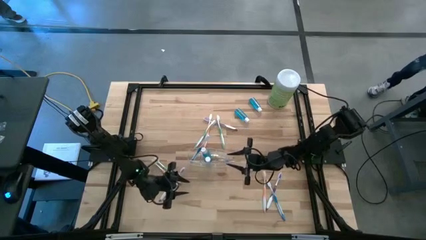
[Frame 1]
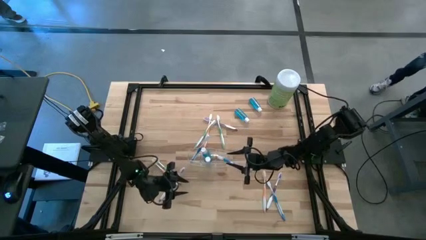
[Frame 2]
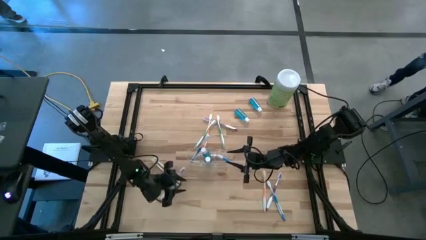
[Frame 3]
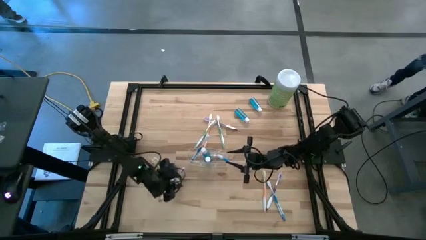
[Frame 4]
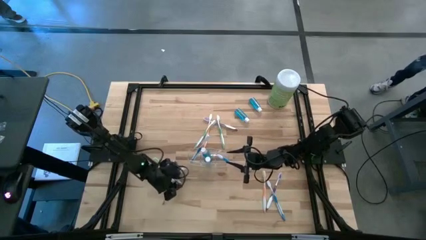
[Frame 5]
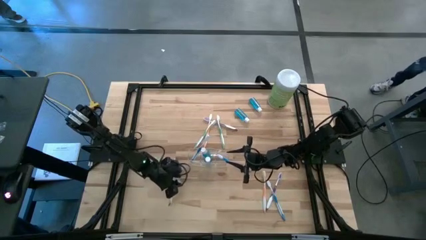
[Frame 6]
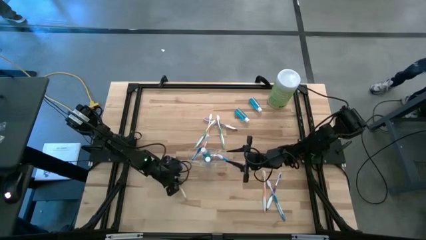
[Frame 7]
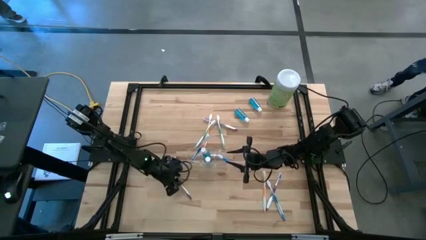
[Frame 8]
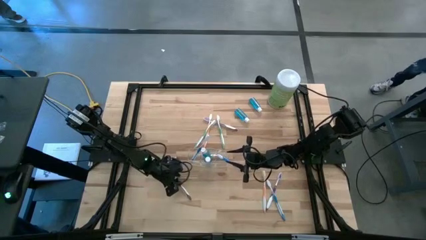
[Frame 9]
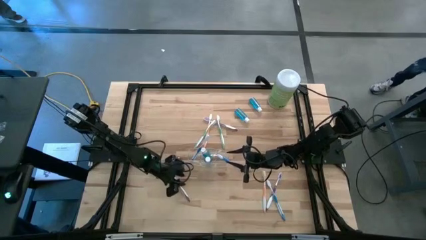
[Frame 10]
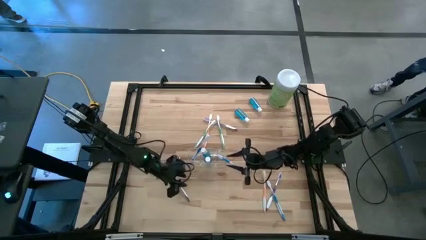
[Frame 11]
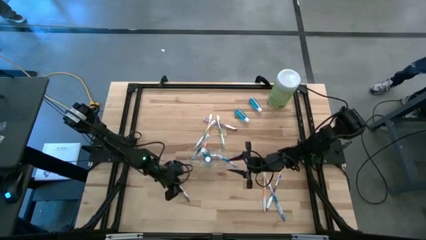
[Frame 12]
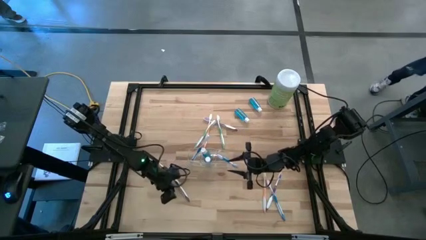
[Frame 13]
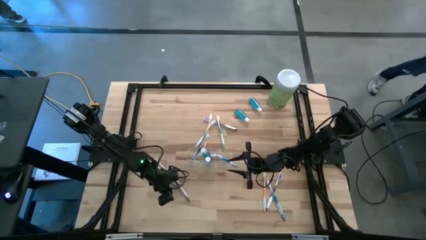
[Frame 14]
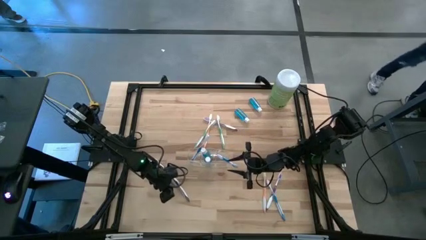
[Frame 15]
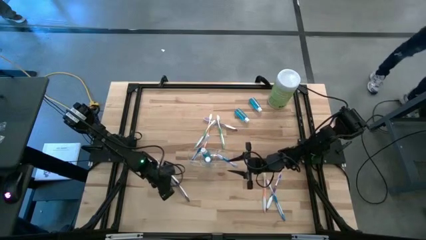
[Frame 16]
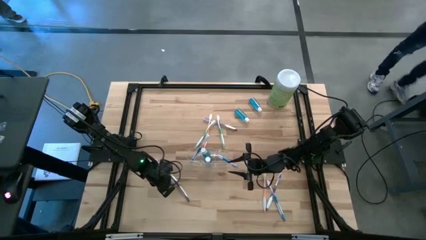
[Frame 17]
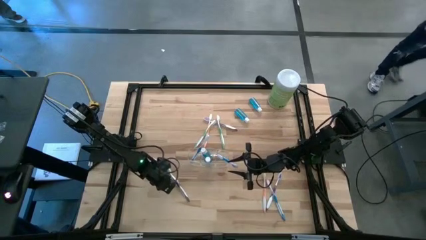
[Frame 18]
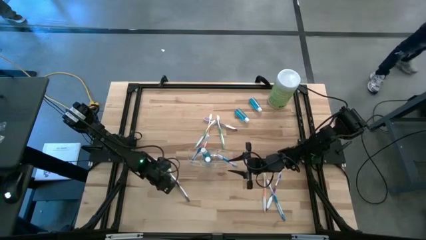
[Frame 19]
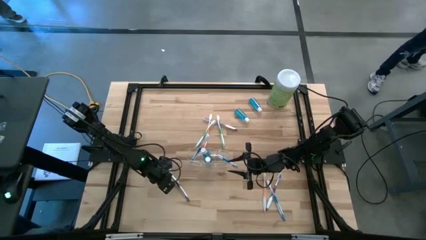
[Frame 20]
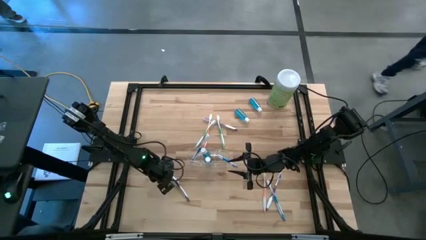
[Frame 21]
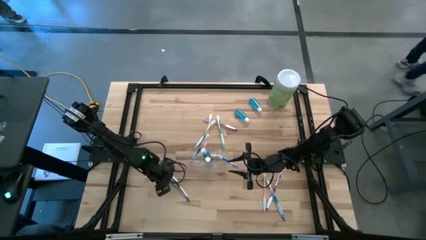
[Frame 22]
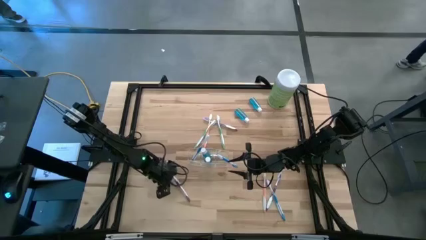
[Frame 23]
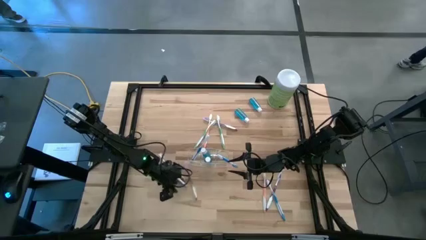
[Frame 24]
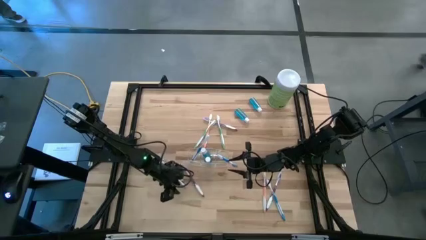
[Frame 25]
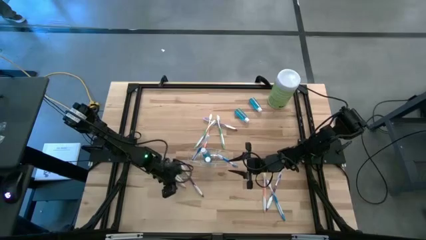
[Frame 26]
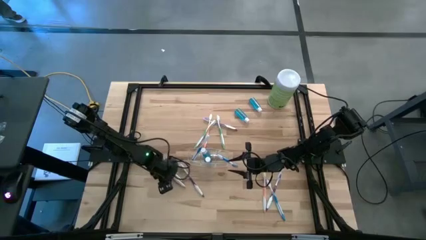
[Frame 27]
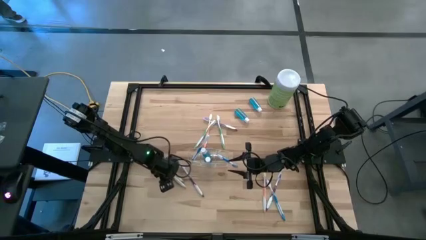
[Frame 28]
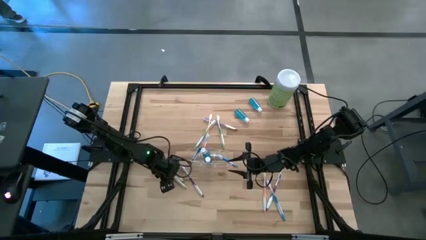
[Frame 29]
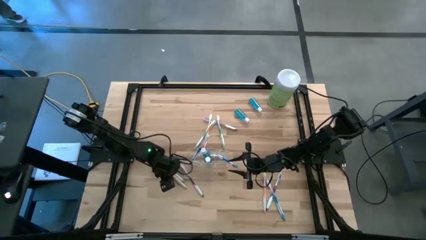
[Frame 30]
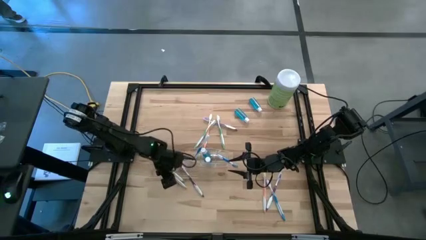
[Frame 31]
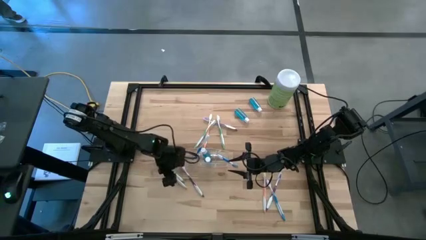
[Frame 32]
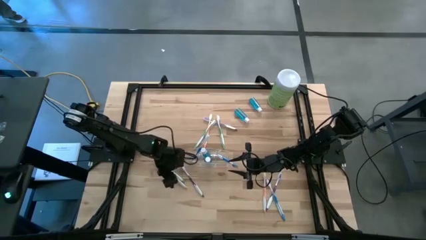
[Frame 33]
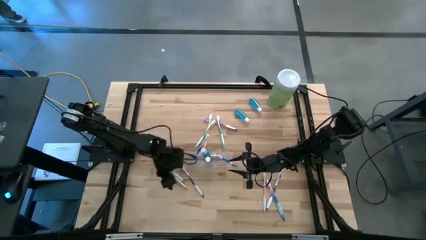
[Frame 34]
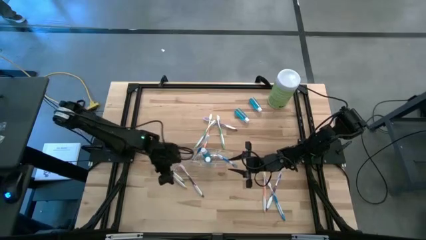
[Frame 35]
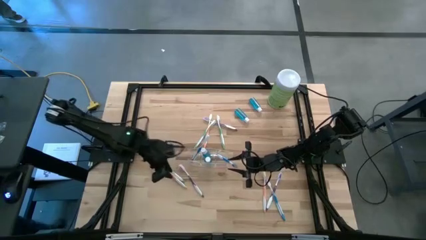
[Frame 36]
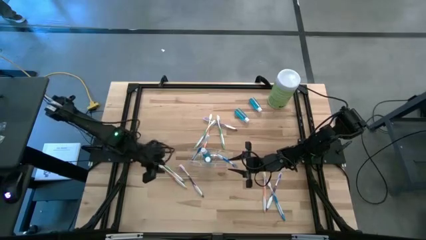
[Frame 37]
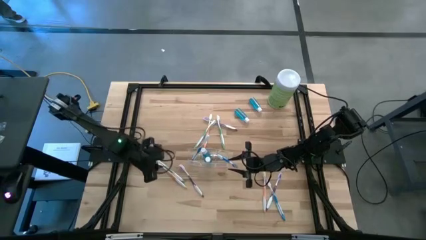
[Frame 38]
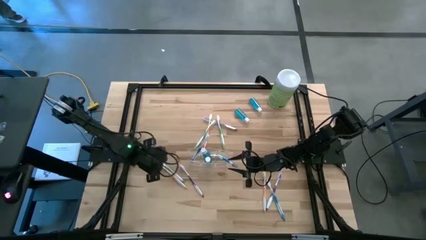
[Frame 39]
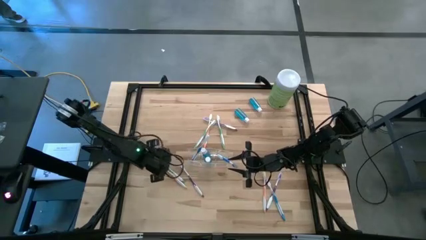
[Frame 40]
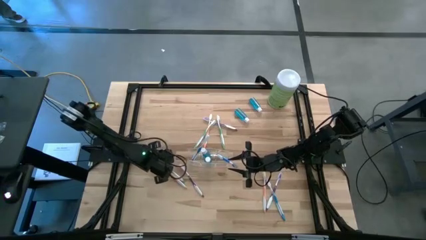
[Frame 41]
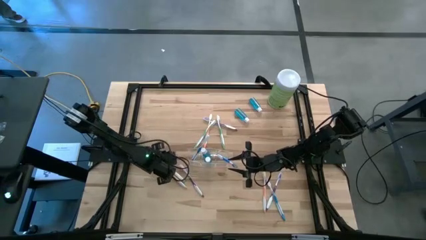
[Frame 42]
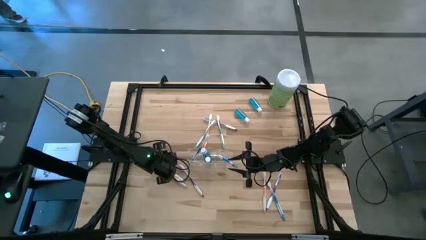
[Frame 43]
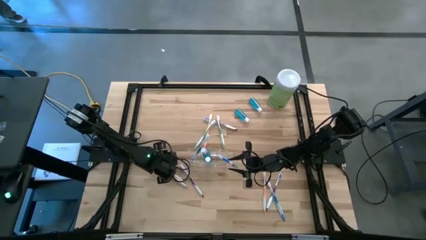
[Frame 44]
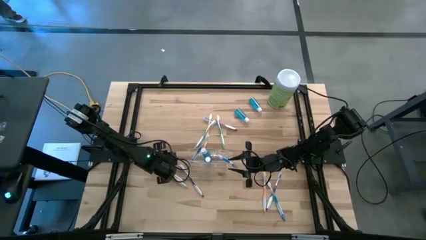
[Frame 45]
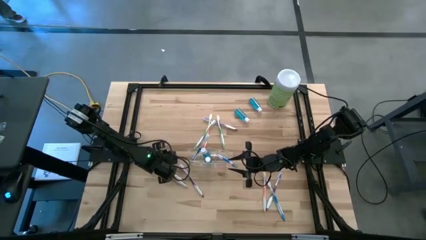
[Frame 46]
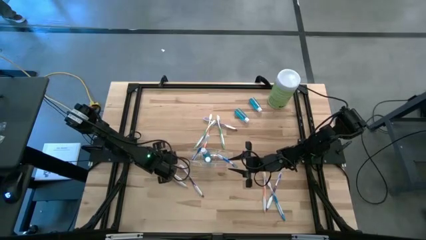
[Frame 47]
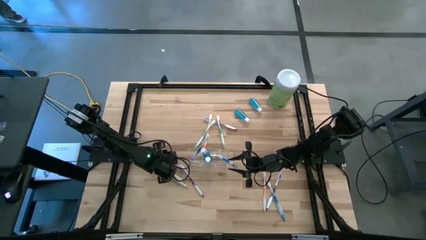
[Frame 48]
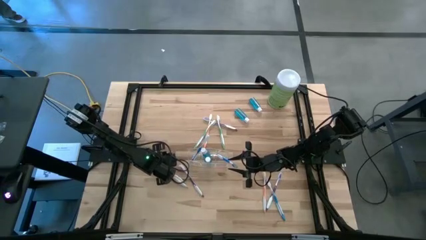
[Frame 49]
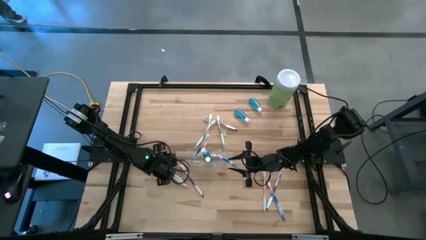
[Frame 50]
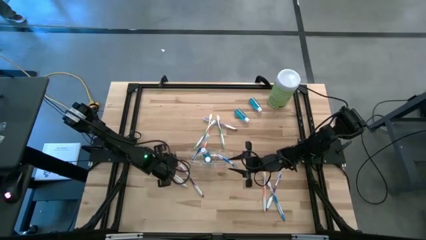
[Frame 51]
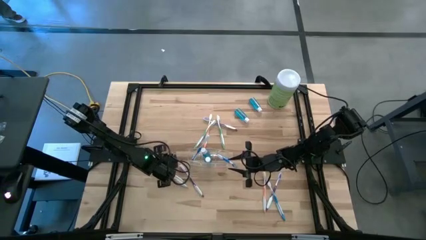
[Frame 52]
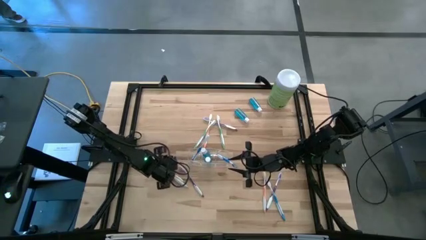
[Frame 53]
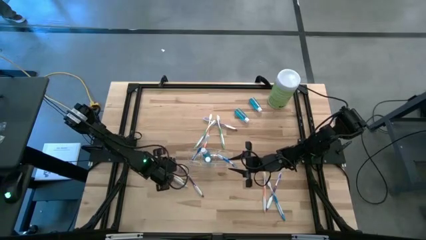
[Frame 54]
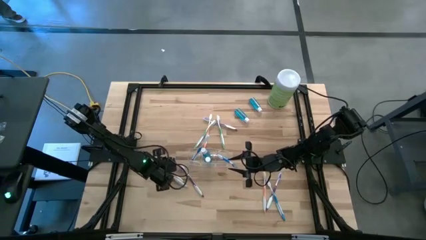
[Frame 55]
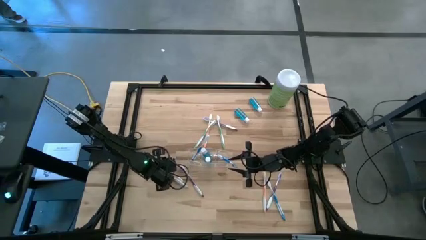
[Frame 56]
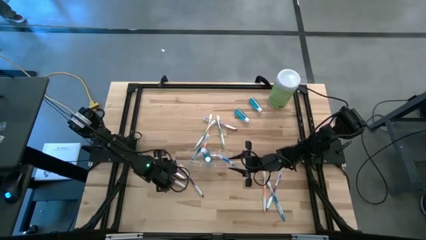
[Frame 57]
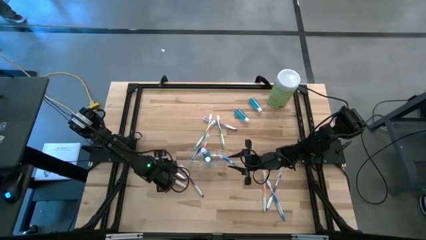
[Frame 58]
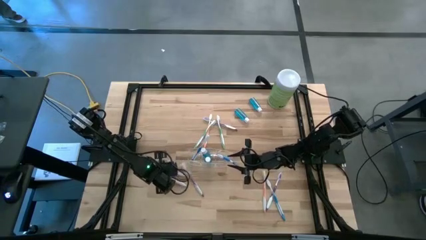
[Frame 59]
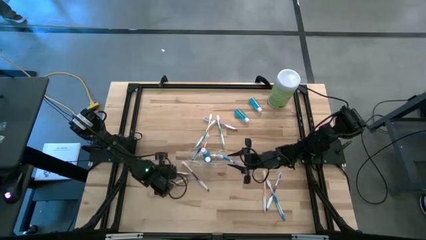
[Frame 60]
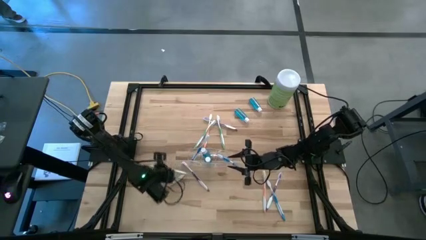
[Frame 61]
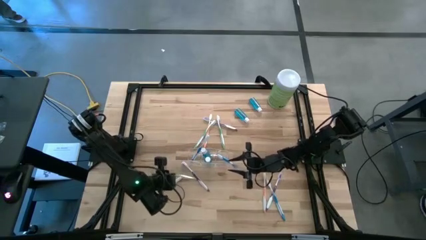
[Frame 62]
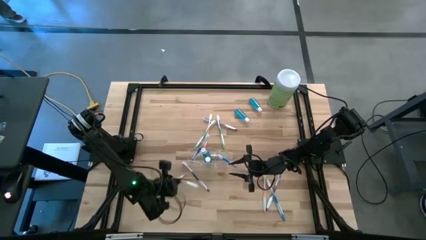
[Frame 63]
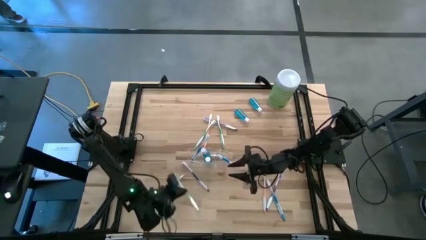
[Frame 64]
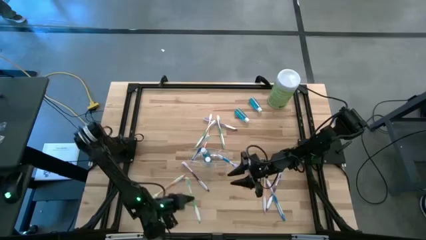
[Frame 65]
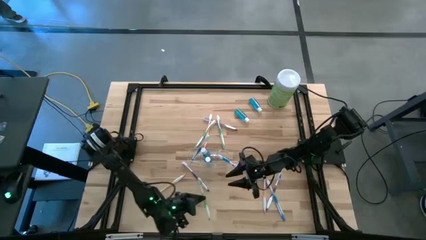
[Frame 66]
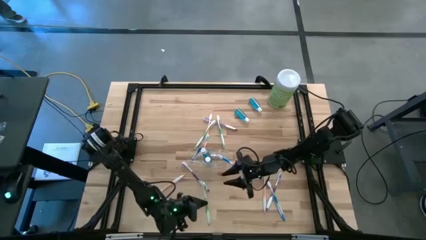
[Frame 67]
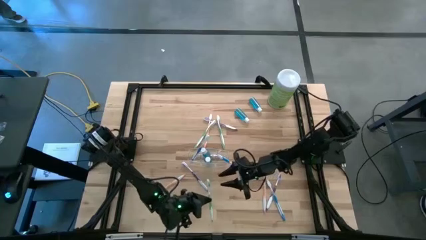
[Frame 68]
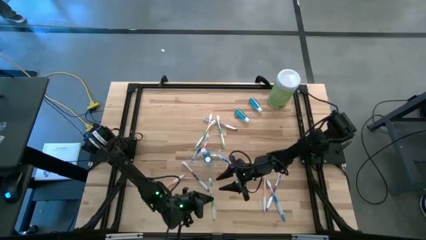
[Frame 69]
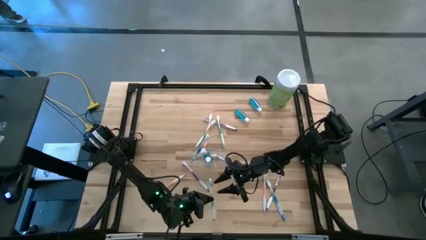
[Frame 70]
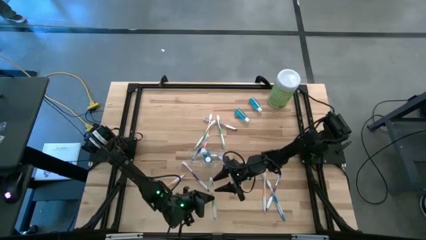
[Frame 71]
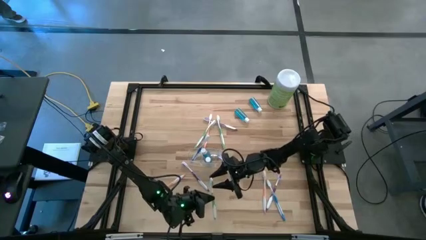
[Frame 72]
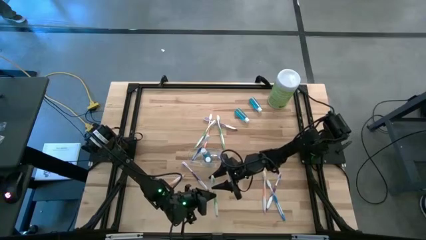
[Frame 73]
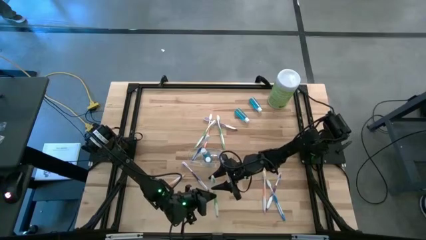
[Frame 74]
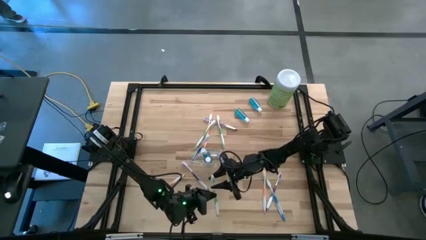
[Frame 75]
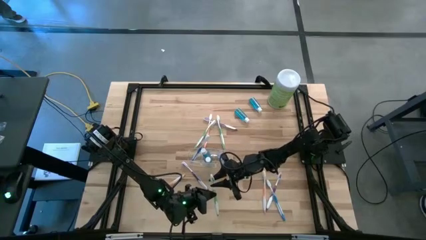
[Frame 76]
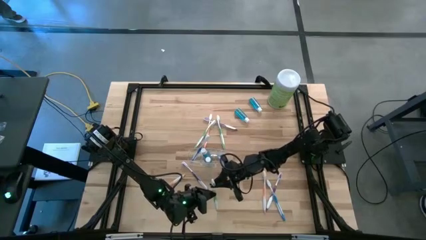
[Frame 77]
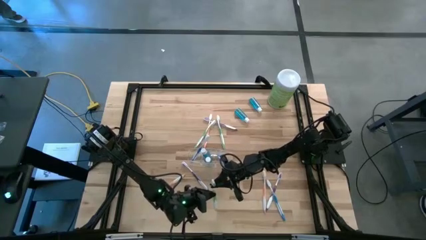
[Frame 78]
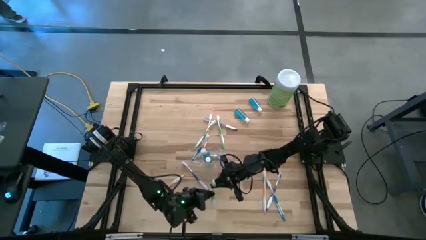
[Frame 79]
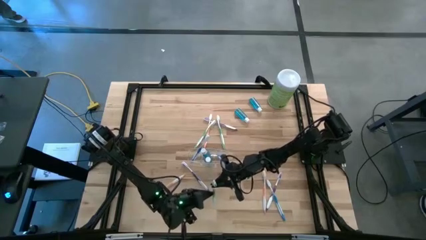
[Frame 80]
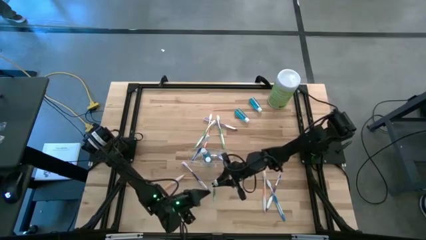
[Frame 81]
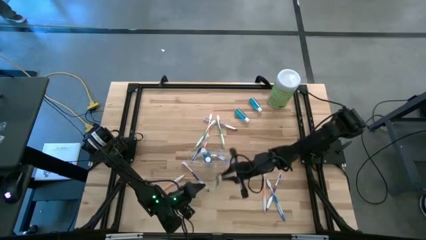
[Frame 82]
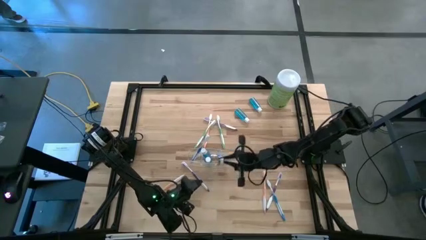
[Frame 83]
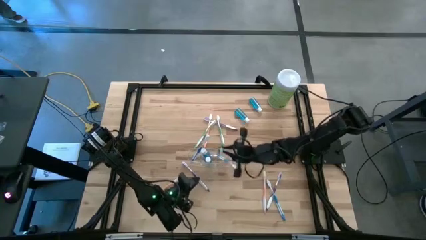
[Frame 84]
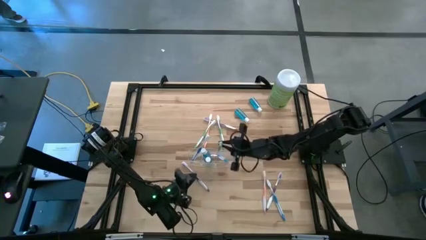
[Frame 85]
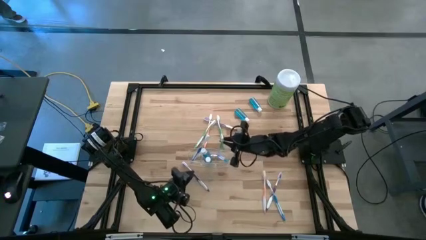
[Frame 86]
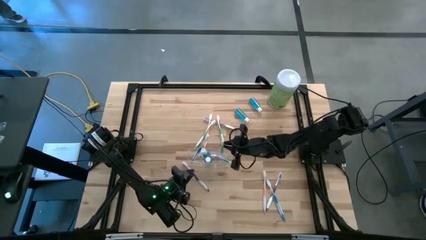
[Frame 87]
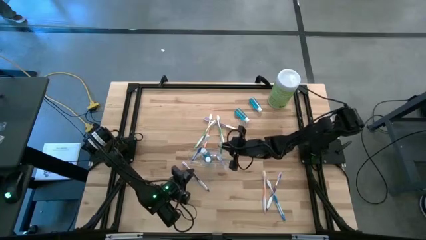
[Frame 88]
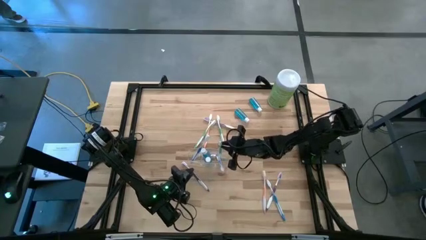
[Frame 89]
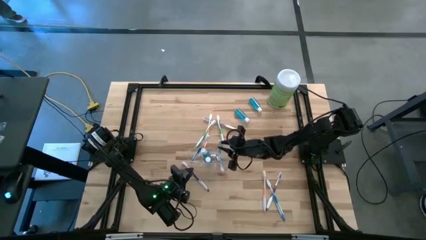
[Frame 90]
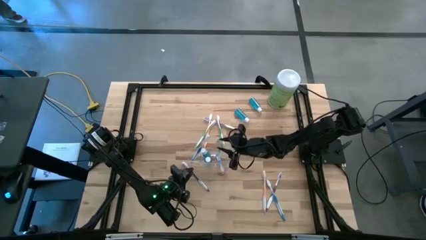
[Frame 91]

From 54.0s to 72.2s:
Task: Pick & Place toothbrushing station
Put the green toothbrush into the right side of the transparent organizer
